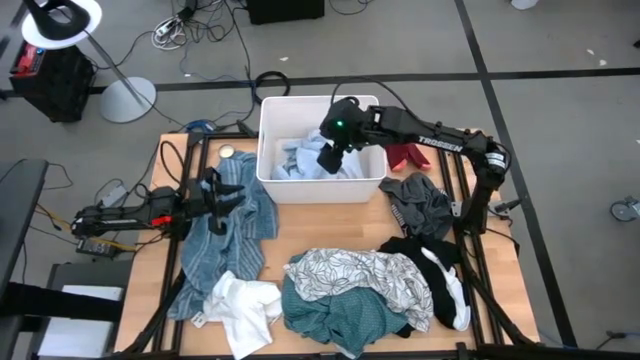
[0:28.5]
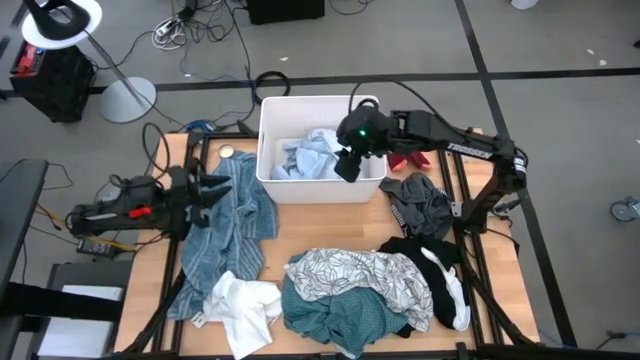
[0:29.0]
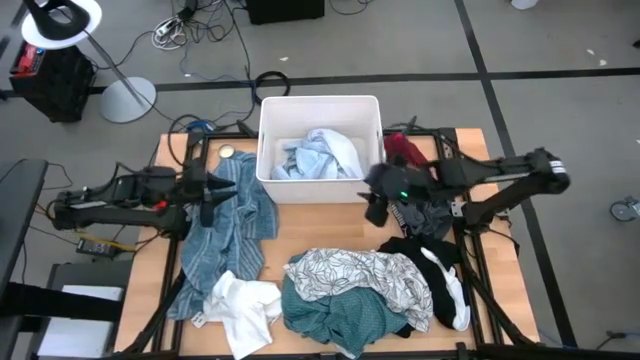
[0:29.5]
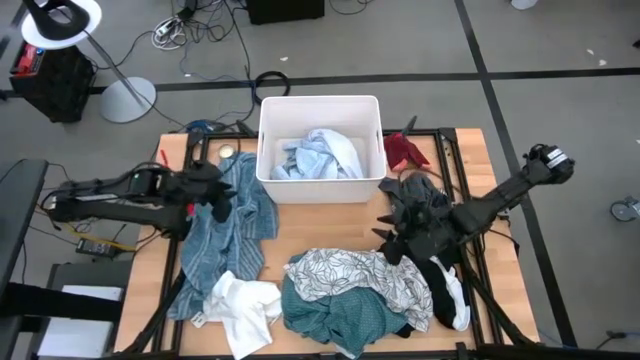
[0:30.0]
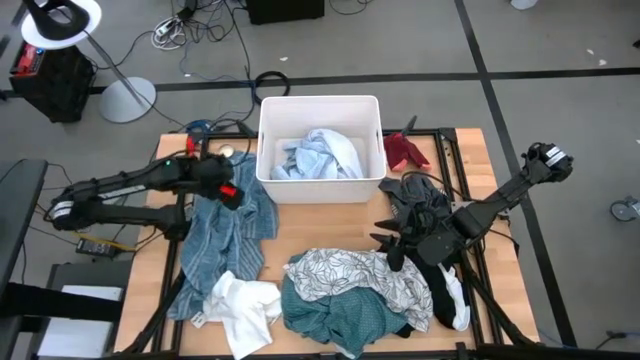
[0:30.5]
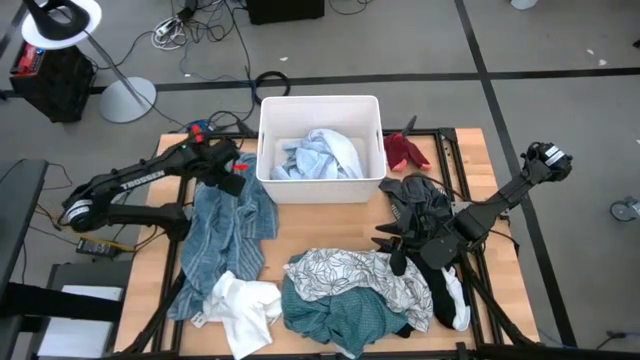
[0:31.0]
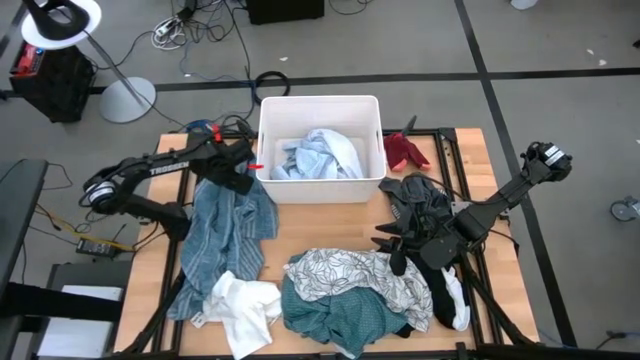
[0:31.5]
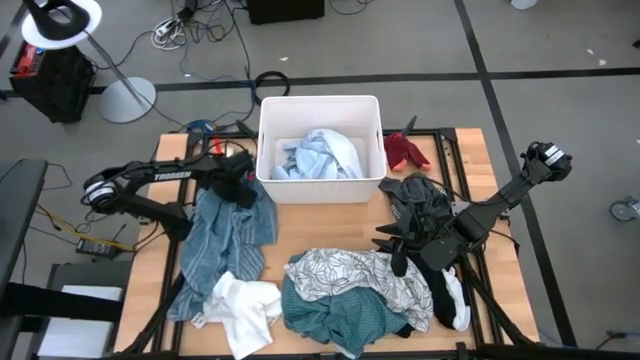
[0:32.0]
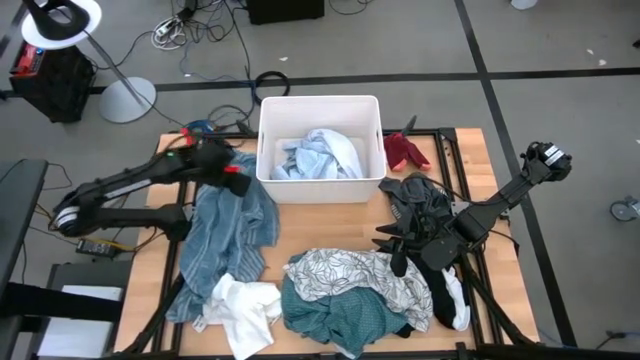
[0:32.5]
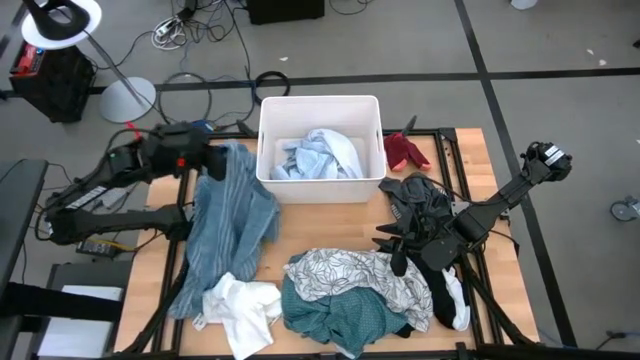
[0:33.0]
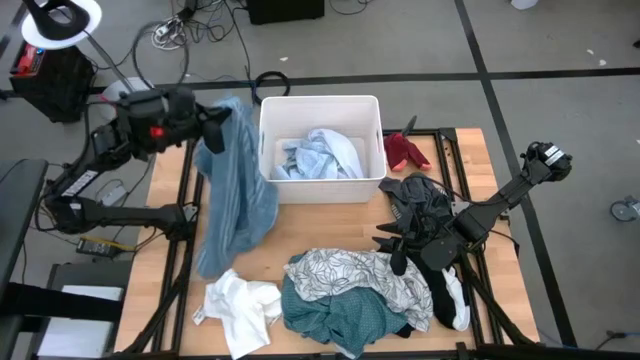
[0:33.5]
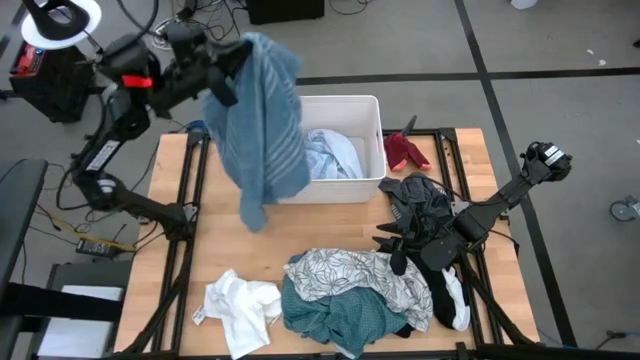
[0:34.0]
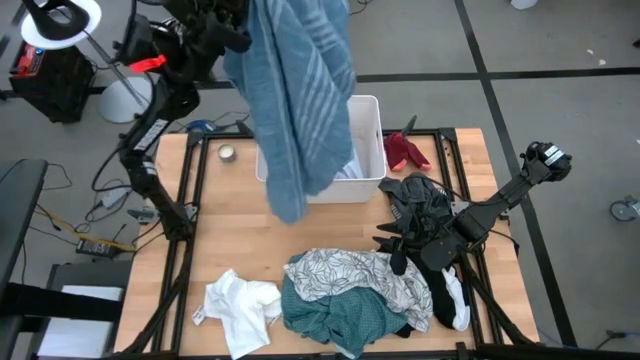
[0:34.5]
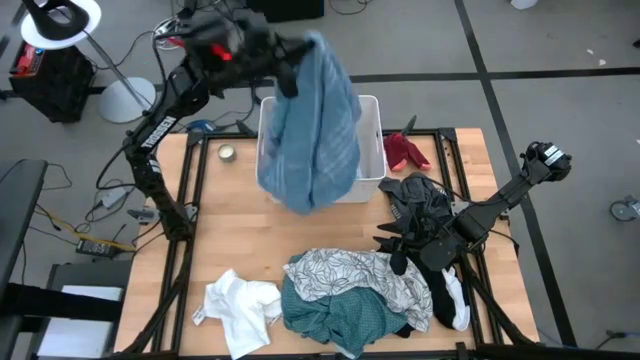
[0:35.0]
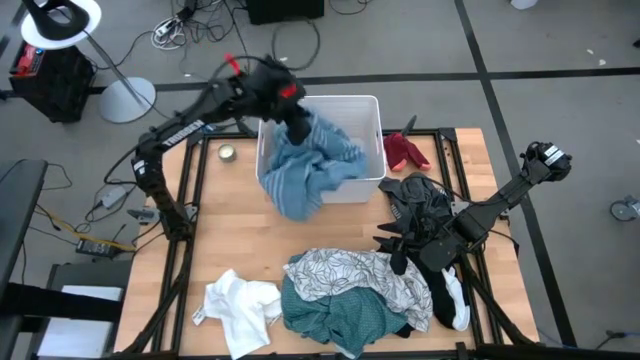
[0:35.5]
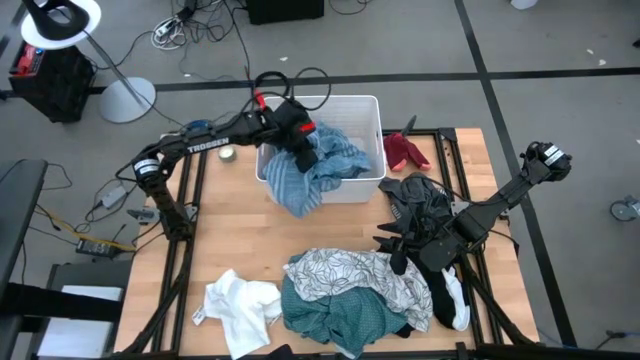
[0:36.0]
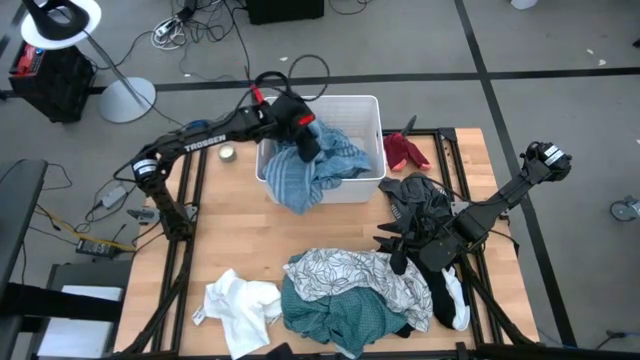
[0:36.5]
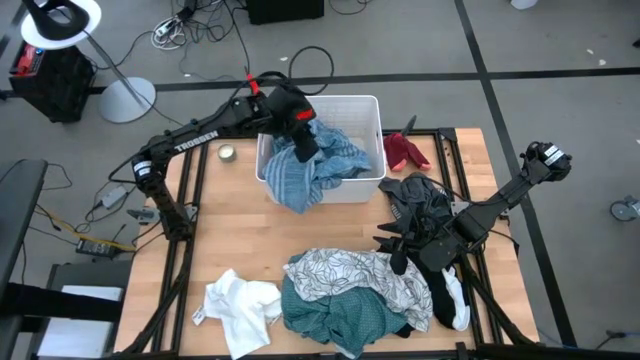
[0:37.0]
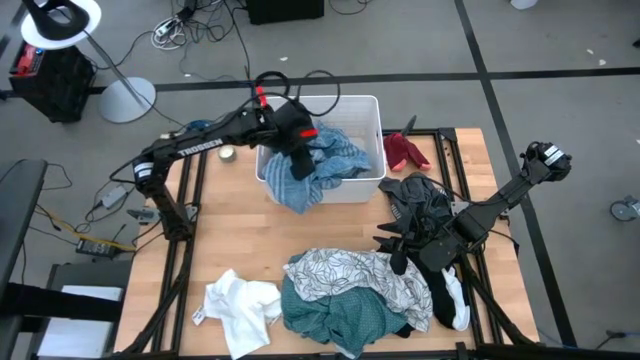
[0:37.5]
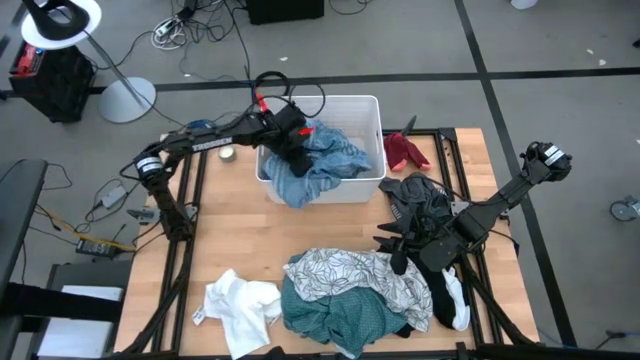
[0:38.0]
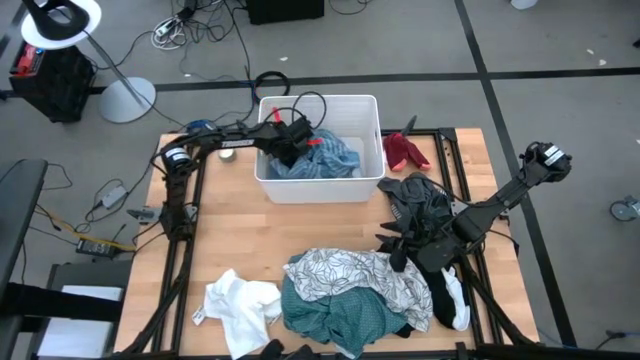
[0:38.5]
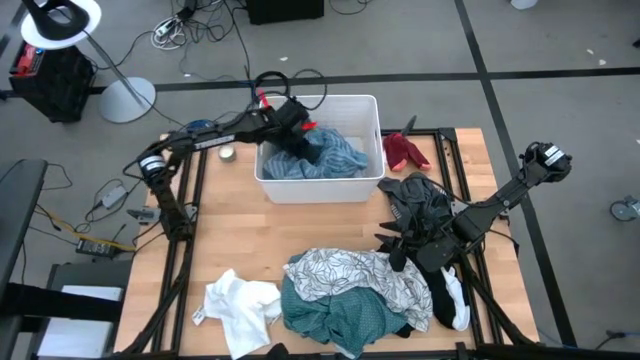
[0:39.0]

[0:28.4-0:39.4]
Task: Sort clothes
Put the blue shirt into the white laundry organizer

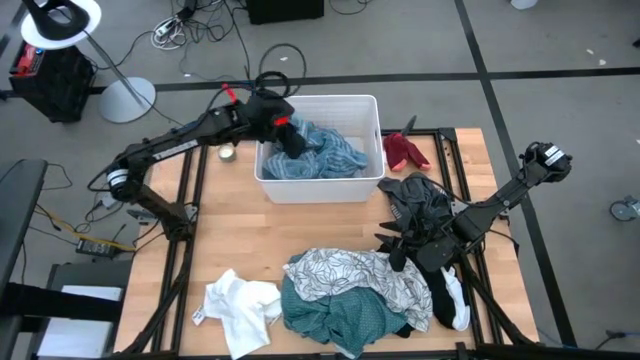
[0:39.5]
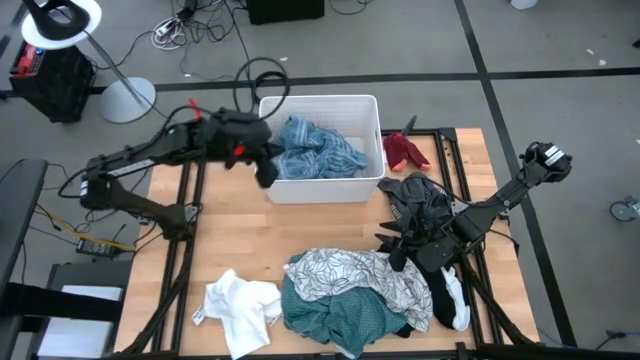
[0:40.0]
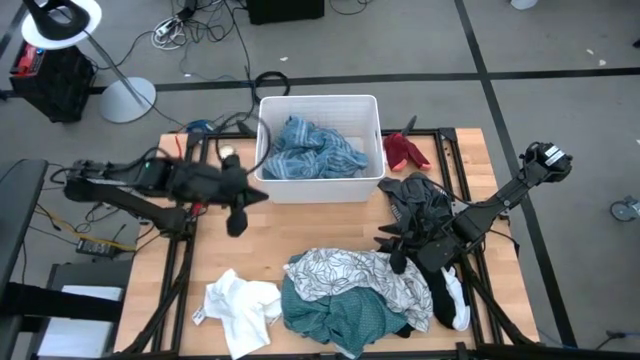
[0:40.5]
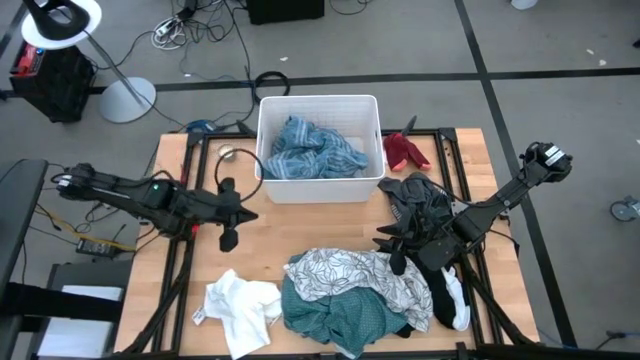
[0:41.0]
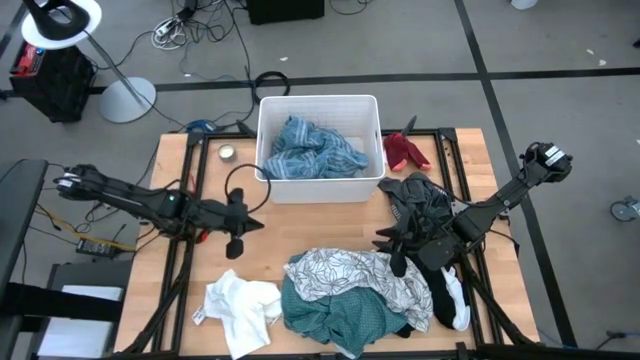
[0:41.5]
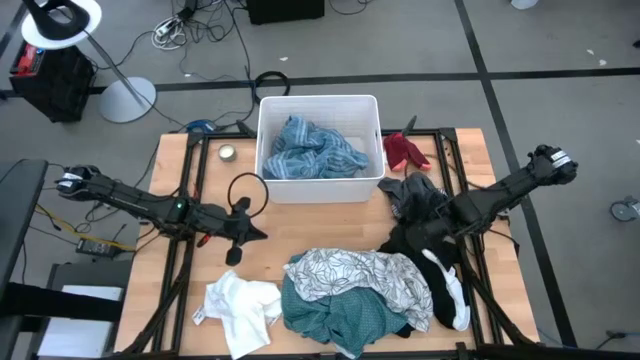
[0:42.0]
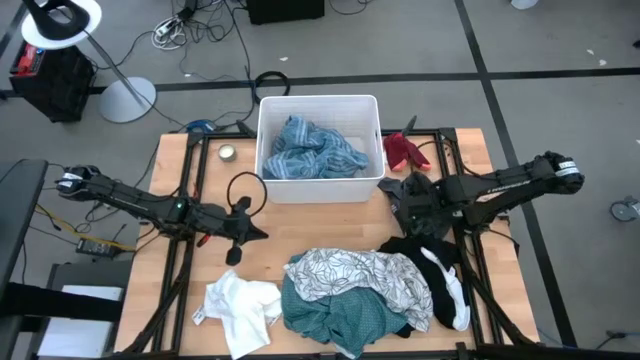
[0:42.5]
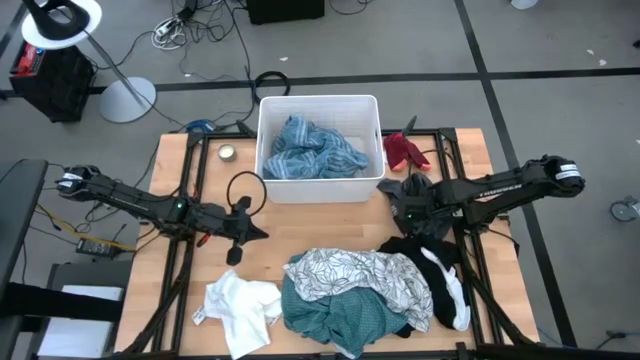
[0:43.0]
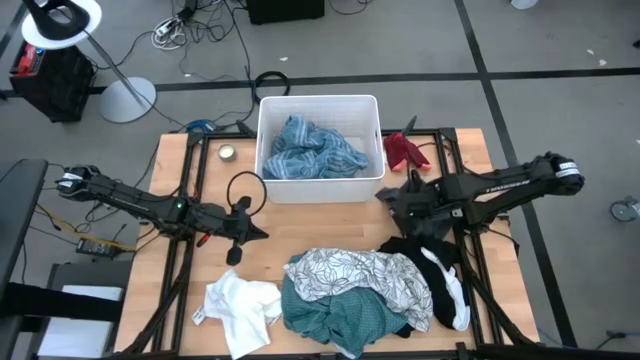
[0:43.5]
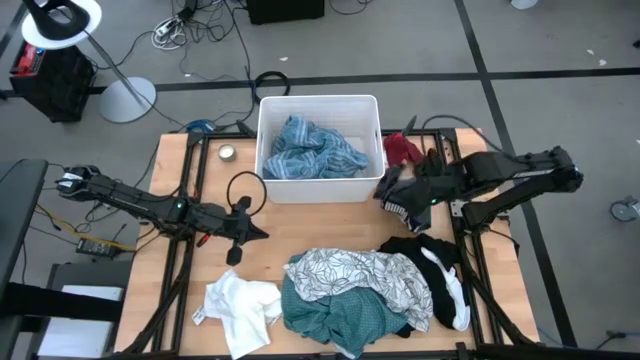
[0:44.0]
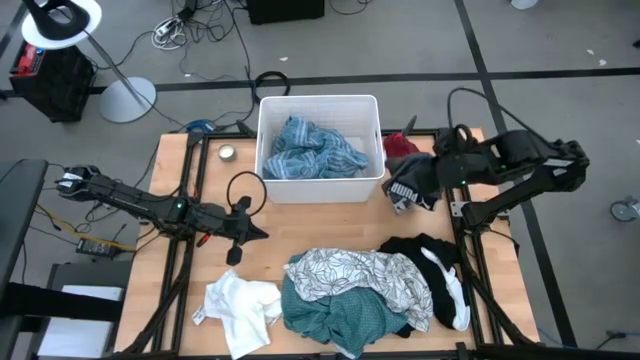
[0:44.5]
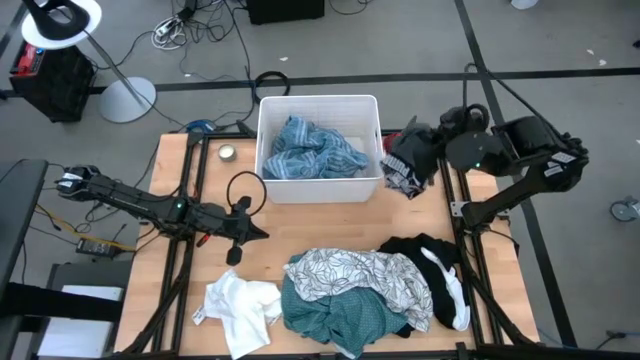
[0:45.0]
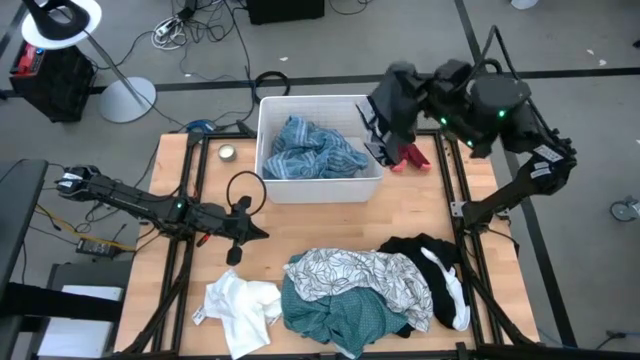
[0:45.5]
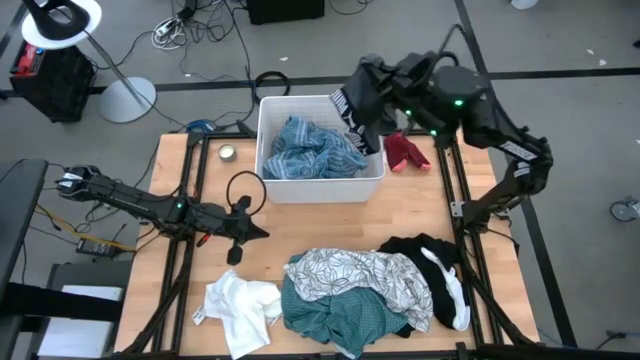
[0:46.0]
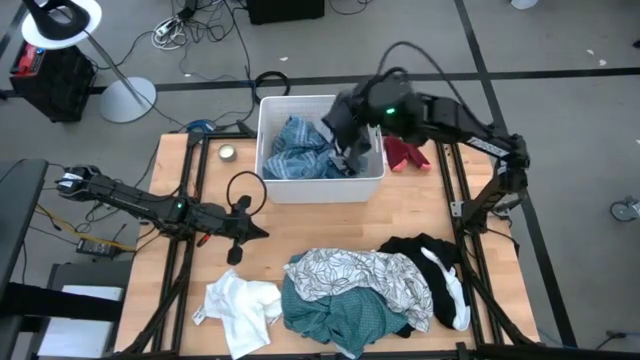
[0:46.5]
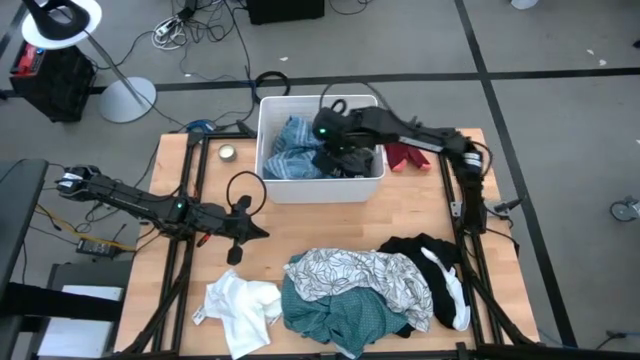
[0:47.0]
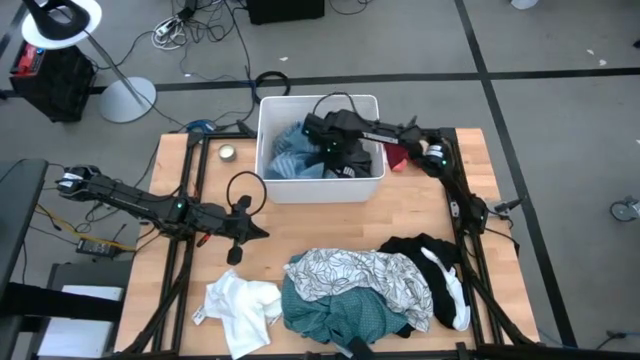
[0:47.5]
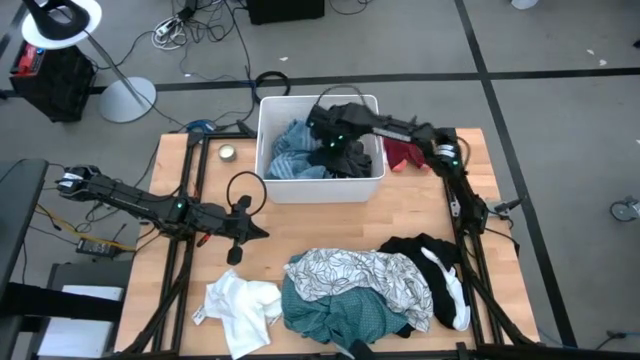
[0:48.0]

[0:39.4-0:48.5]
Put the gray boxer into the white laundry organizer
